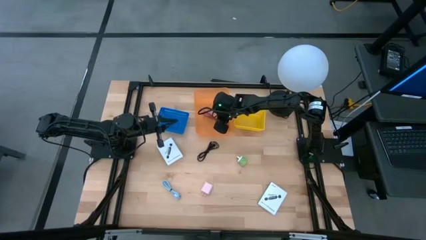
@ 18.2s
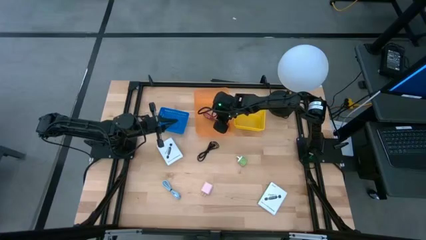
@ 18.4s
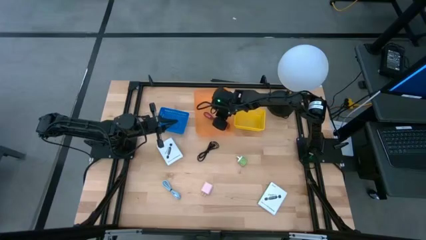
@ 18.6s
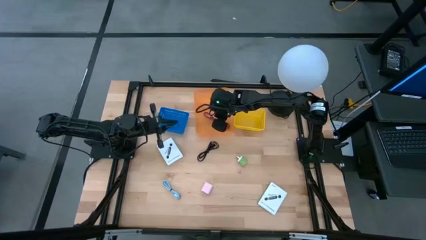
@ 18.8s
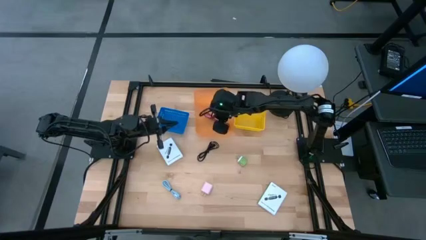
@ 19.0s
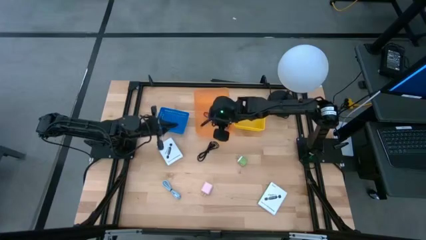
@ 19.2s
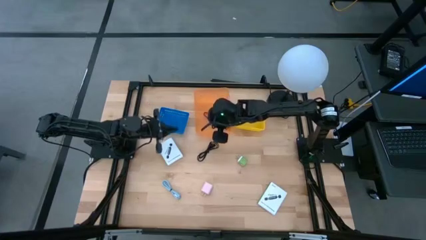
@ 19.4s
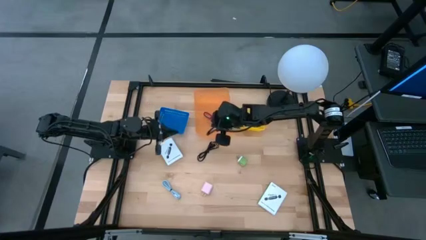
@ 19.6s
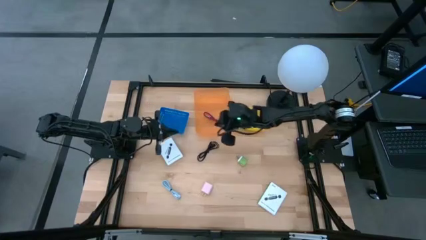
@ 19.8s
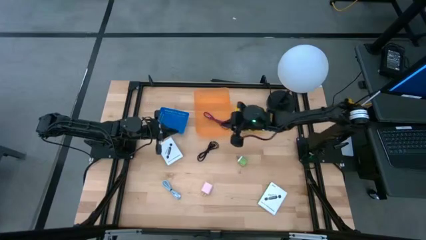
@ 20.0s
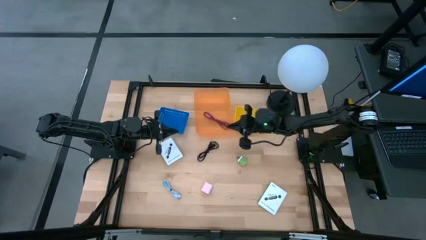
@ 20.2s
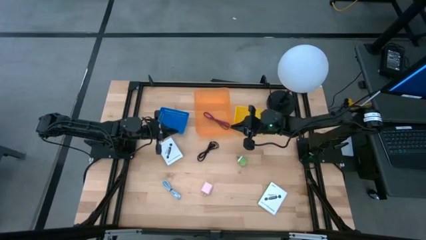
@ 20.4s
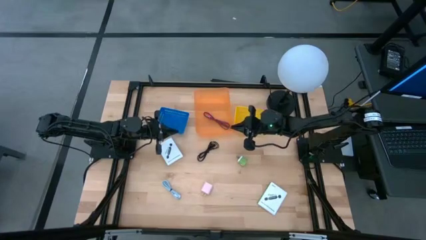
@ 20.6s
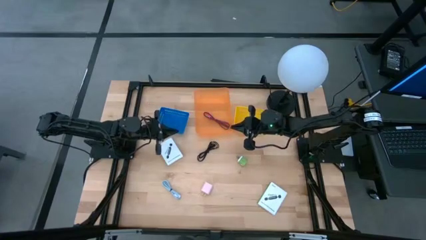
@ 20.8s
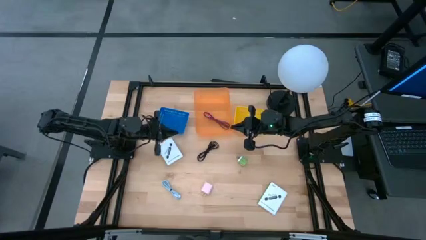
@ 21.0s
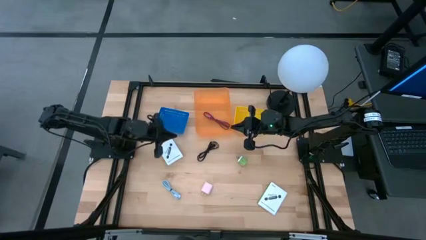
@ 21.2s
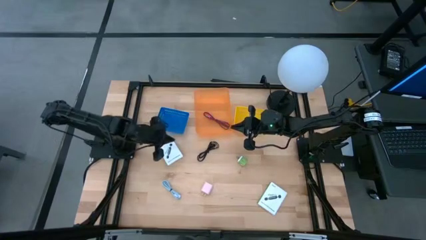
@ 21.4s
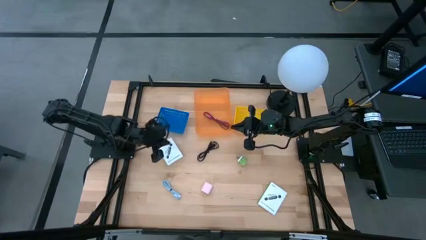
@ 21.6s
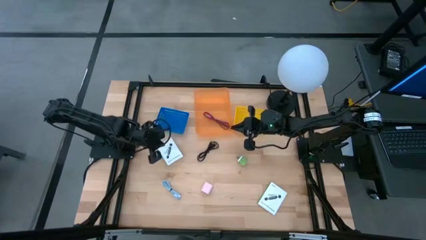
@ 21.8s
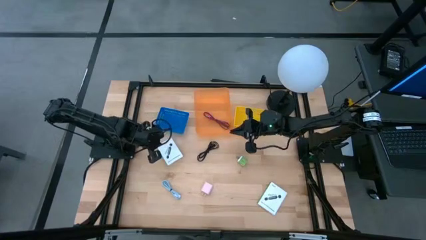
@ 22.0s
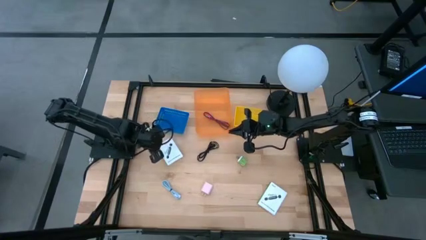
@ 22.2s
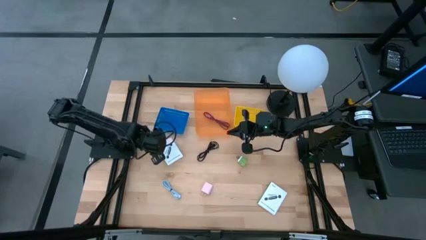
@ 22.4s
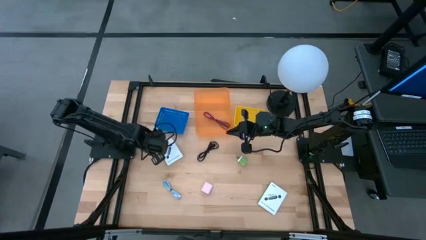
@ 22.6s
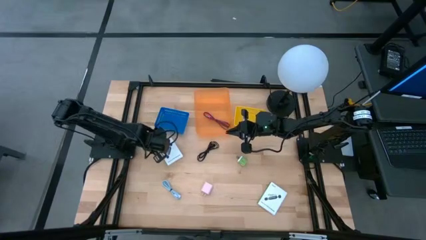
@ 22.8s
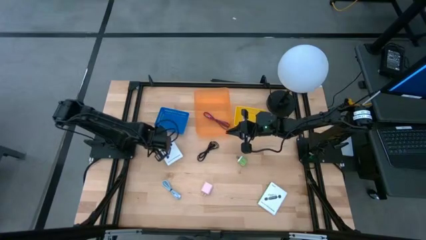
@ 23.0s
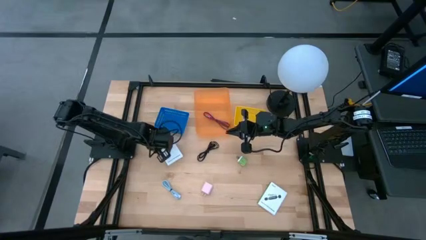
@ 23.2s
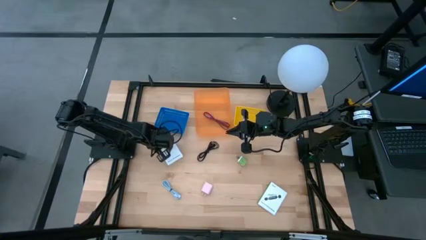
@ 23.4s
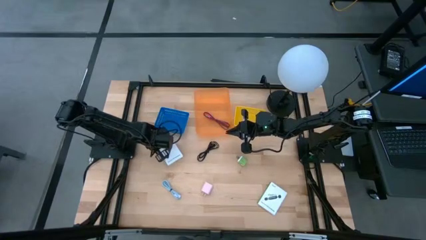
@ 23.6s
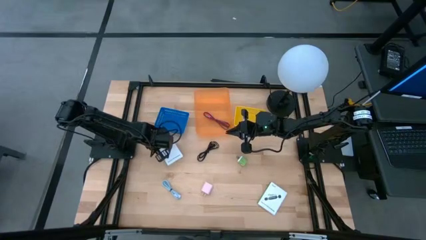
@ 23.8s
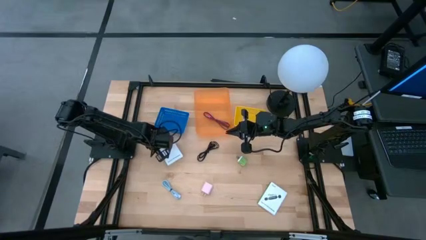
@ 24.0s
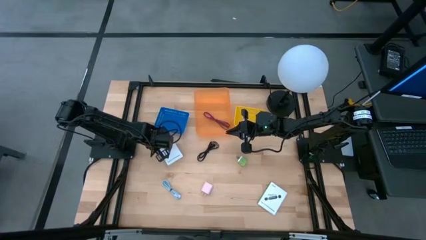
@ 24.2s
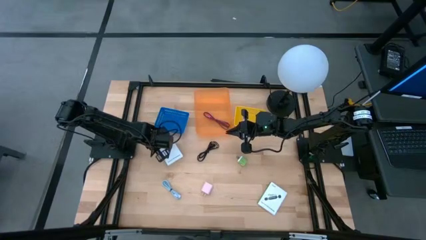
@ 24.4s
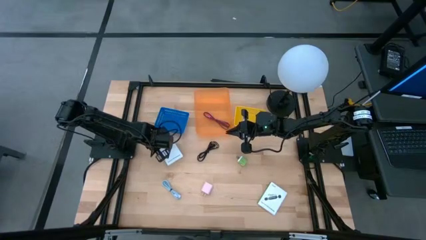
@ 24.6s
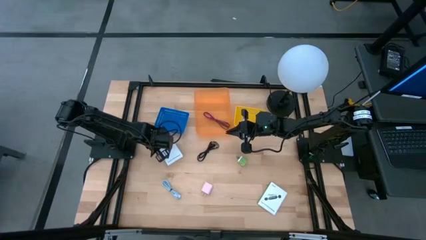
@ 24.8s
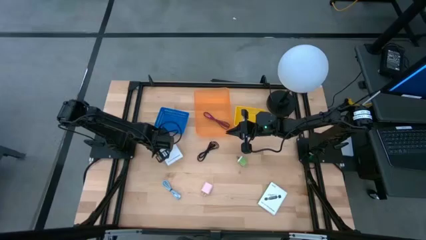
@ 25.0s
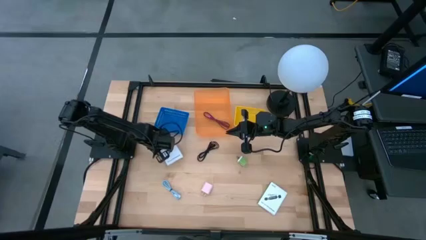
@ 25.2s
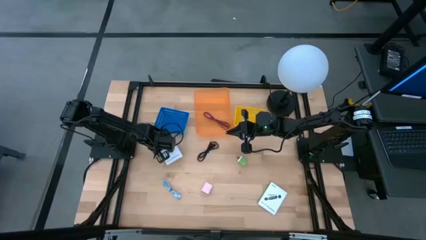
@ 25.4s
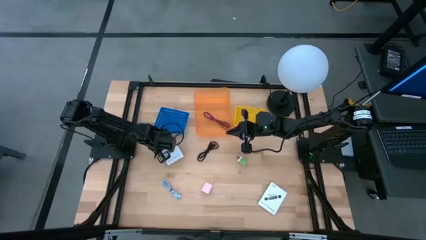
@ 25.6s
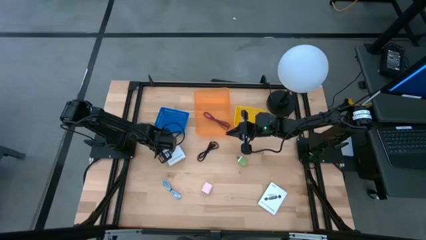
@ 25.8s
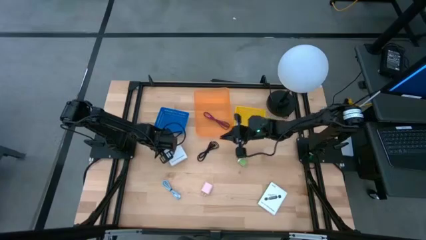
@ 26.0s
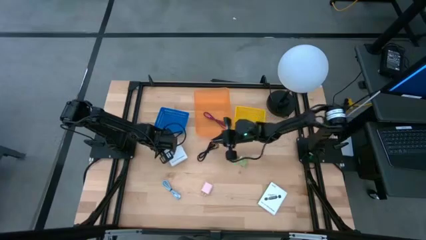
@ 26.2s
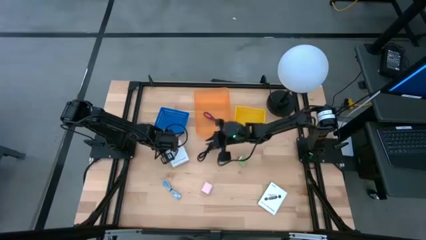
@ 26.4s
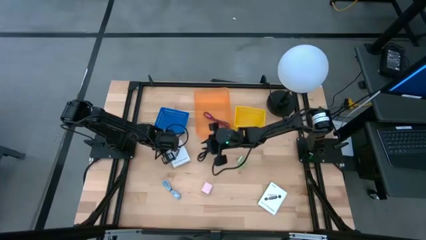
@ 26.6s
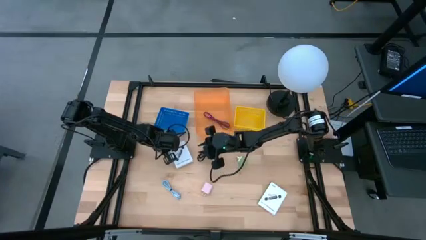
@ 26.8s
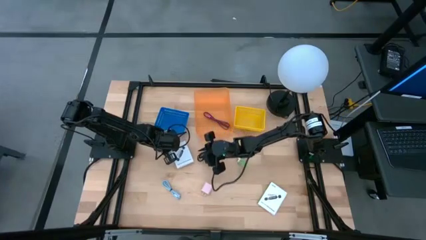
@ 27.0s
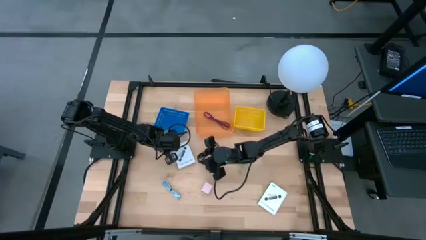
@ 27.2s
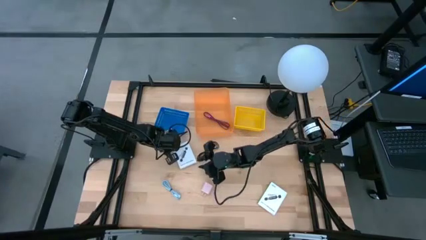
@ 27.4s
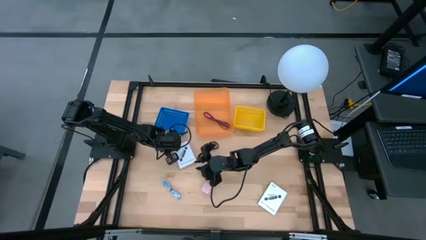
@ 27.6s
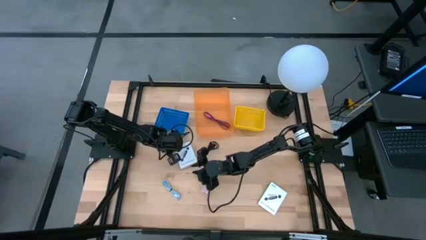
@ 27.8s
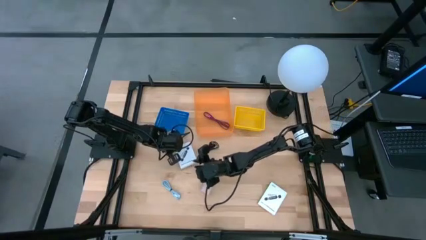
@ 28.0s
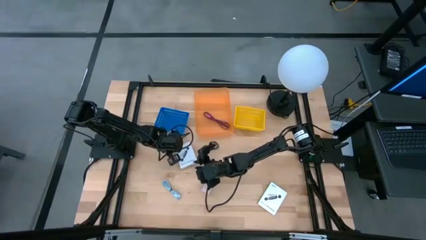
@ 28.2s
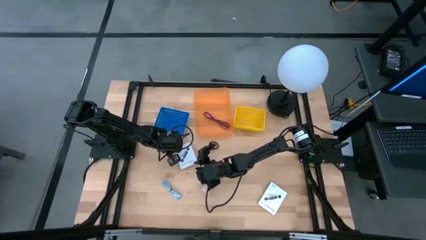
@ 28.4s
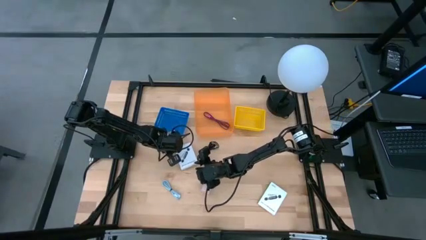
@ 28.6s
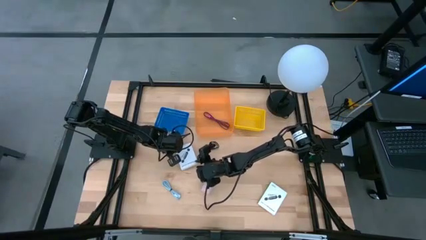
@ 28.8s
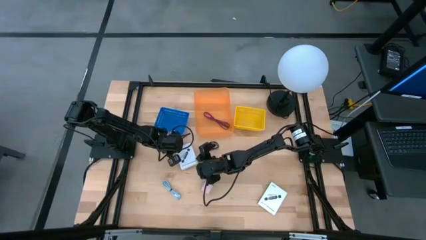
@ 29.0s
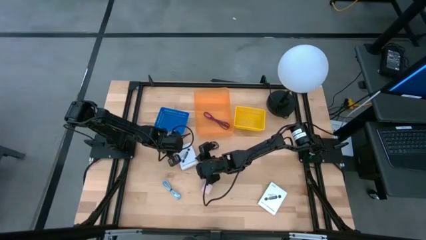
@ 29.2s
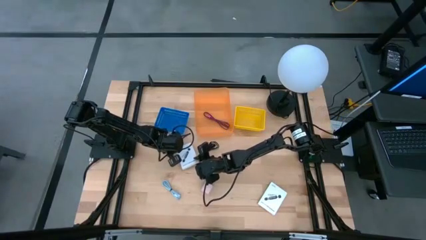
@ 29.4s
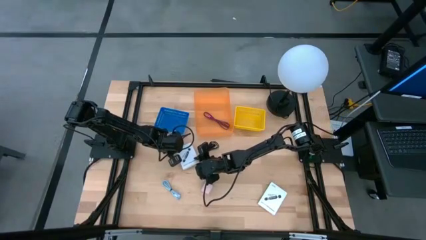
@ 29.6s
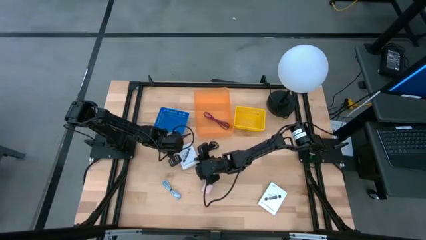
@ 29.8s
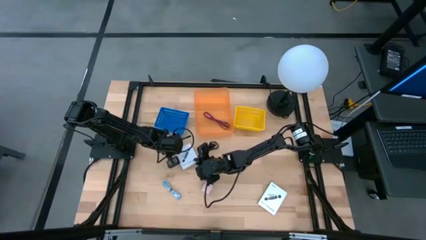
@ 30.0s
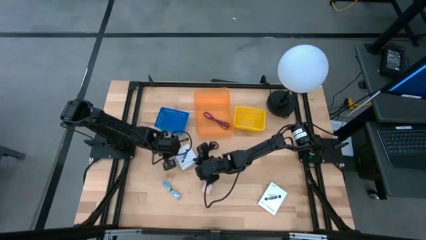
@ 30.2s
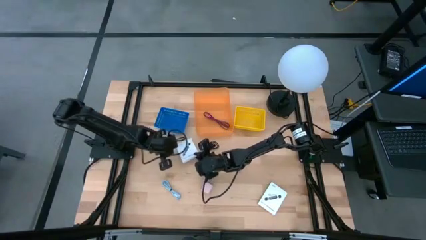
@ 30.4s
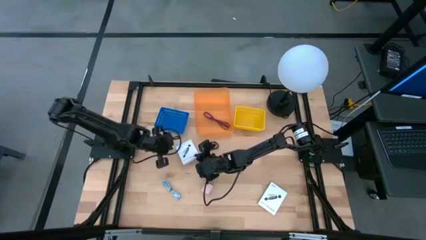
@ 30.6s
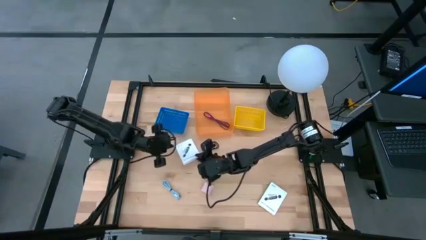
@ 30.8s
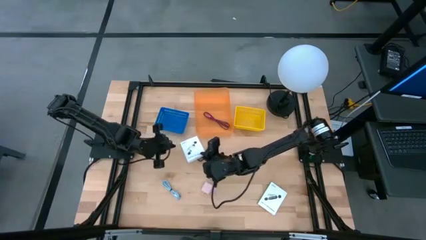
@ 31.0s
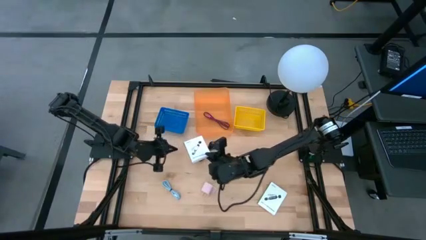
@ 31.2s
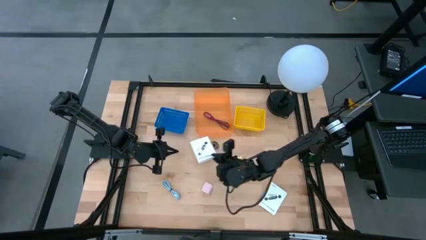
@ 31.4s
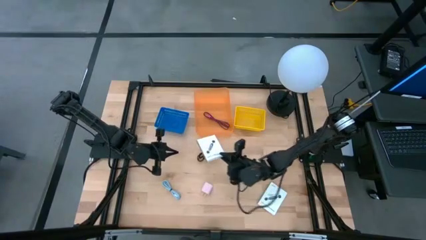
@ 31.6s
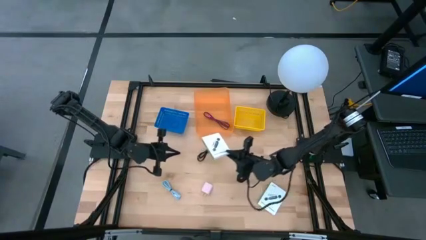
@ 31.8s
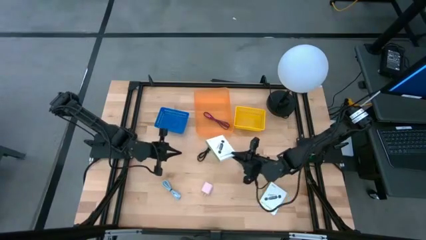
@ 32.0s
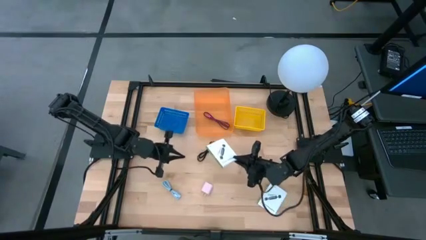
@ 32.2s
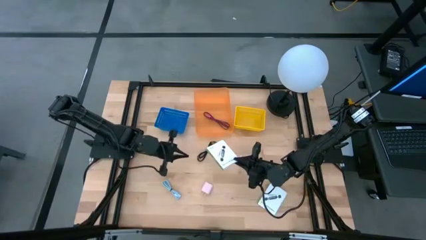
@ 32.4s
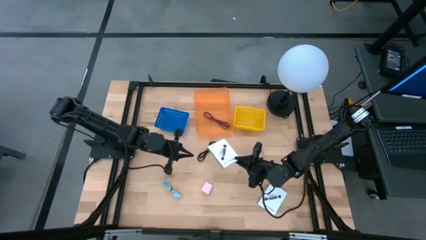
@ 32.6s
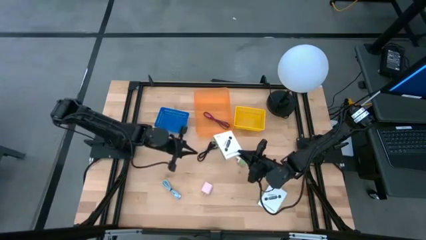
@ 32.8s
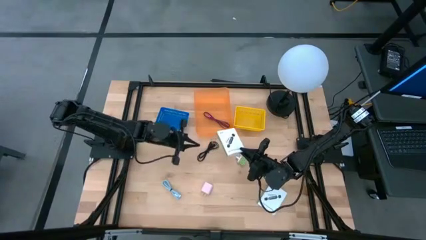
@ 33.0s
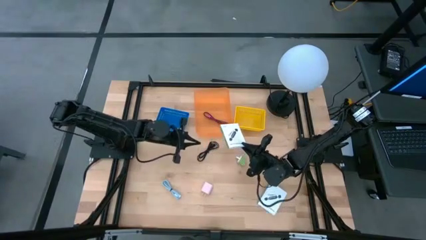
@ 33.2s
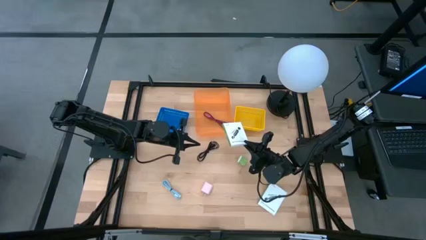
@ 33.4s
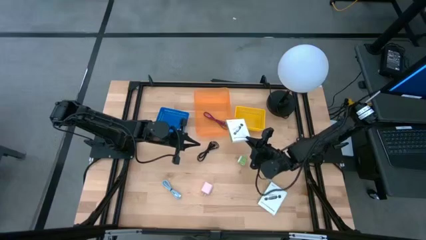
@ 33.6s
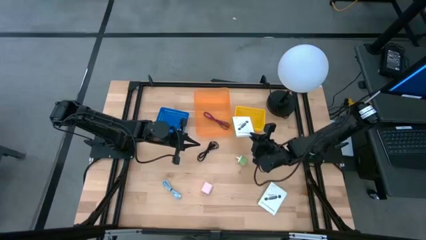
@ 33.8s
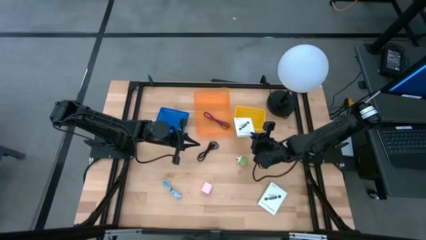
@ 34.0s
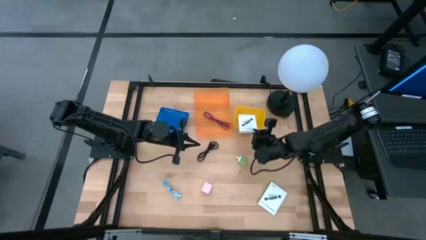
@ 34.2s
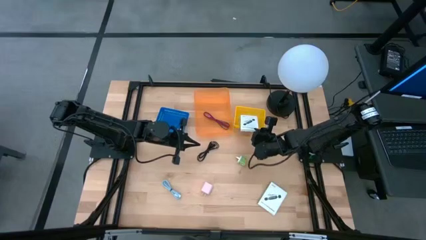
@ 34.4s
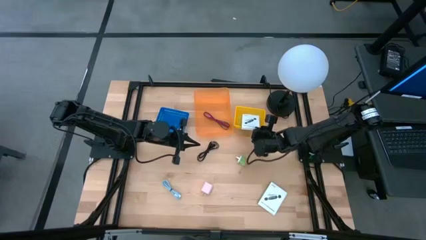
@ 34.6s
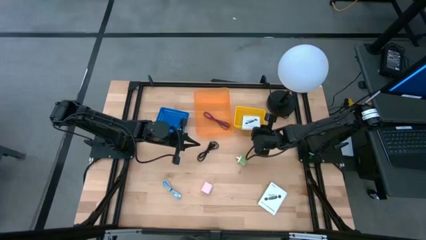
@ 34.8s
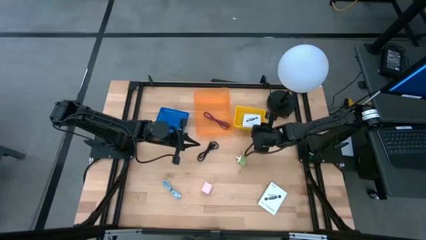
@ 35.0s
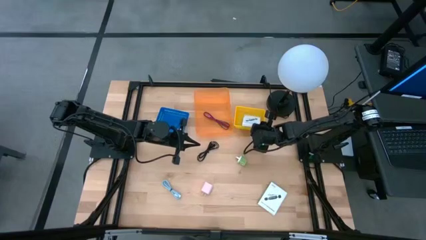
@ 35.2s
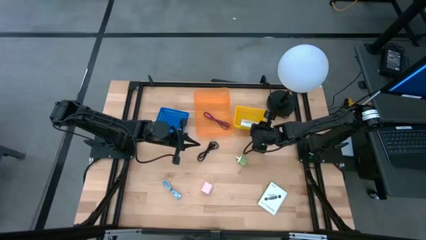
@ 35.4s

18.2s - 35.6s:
Task: Pick and place items into bin
Put the top white USB box into the yellow bin
